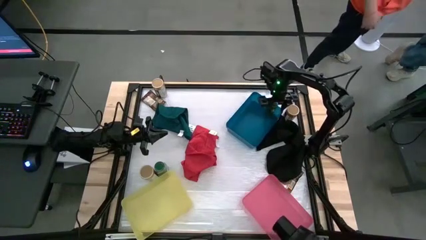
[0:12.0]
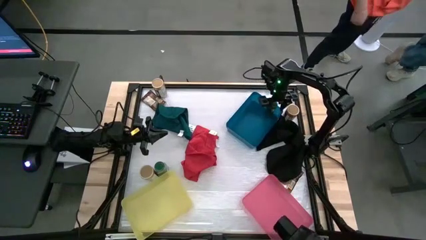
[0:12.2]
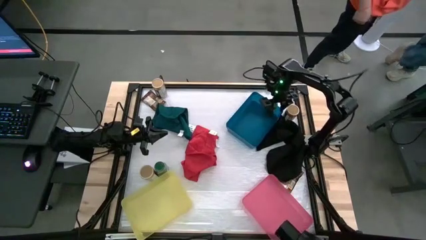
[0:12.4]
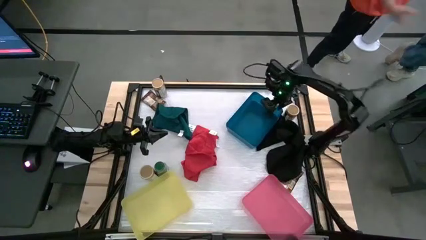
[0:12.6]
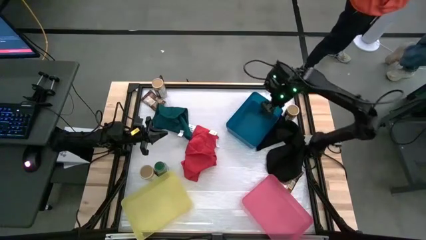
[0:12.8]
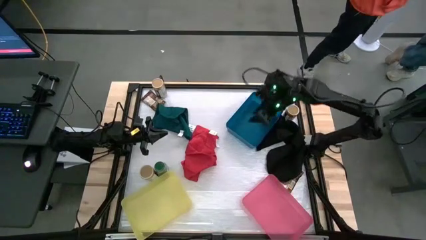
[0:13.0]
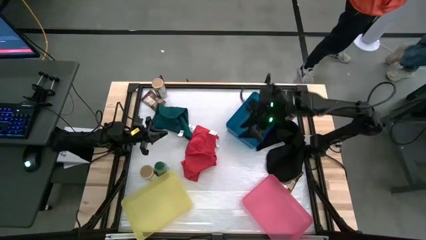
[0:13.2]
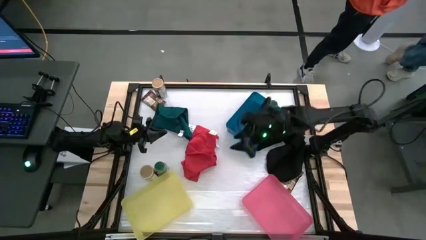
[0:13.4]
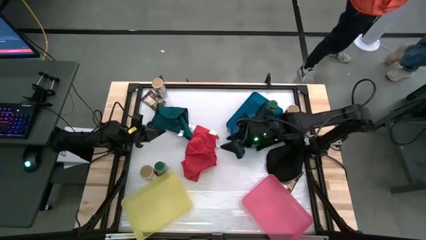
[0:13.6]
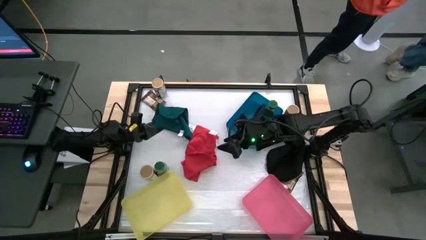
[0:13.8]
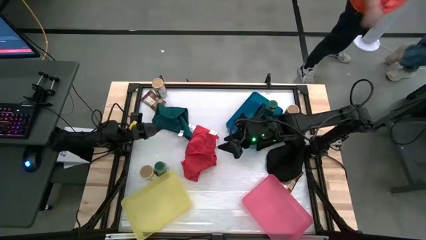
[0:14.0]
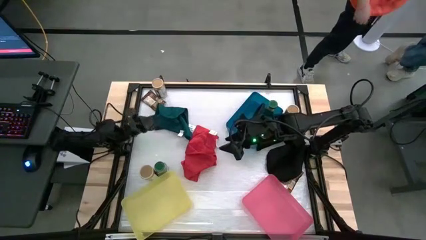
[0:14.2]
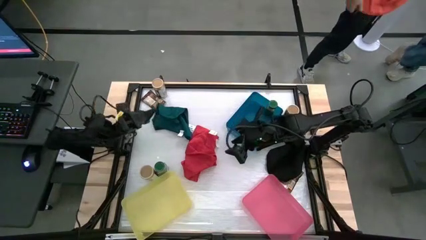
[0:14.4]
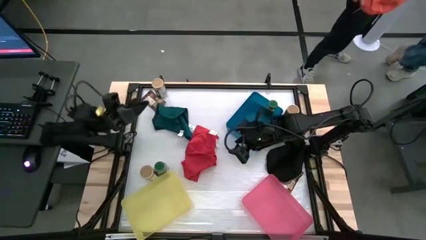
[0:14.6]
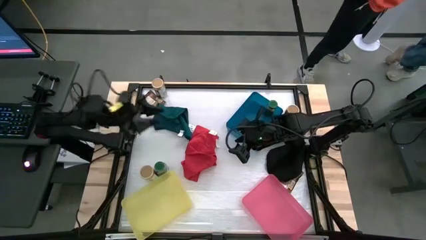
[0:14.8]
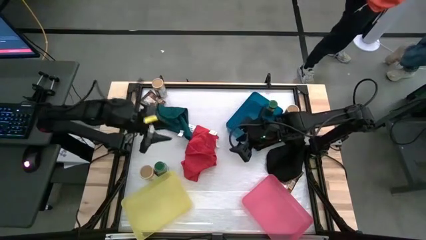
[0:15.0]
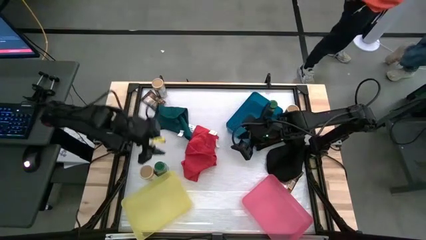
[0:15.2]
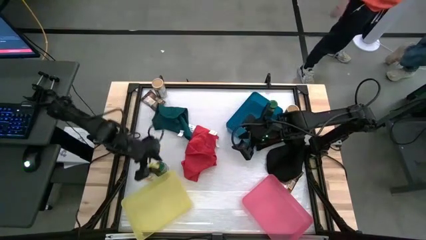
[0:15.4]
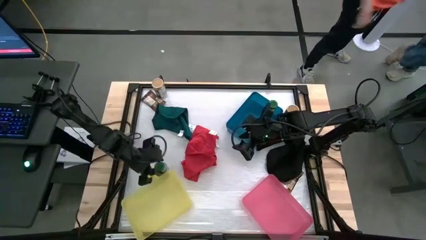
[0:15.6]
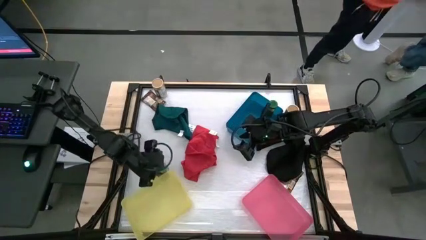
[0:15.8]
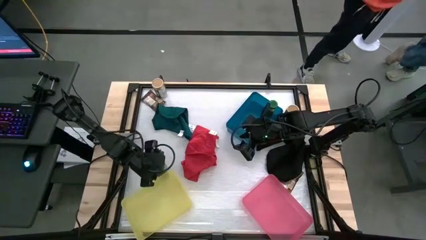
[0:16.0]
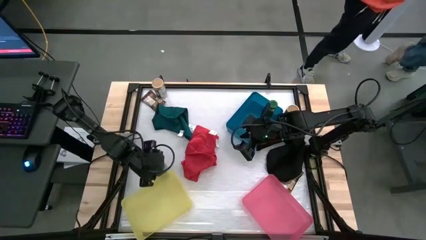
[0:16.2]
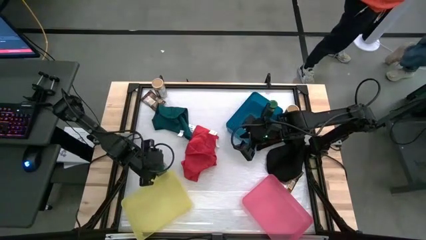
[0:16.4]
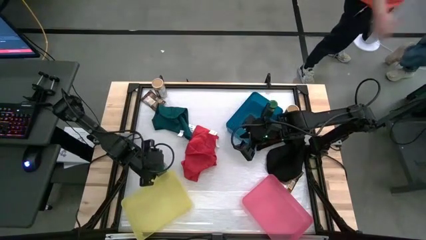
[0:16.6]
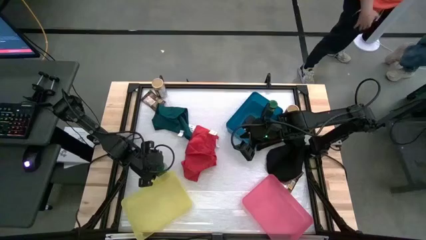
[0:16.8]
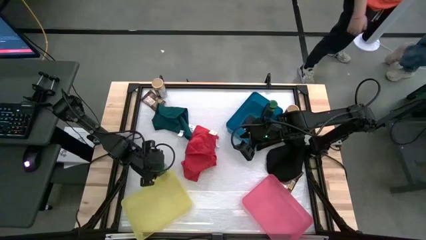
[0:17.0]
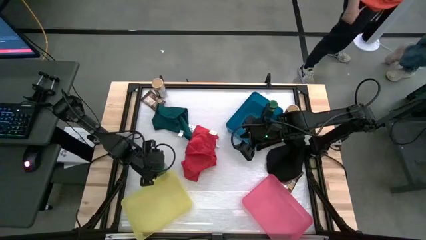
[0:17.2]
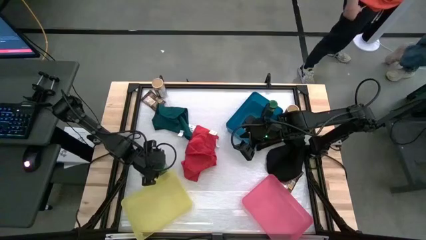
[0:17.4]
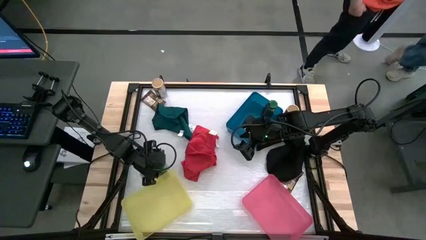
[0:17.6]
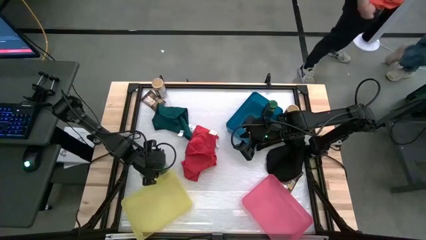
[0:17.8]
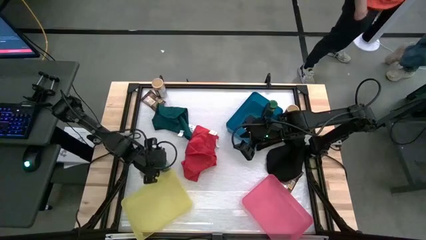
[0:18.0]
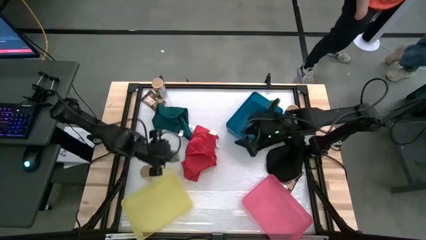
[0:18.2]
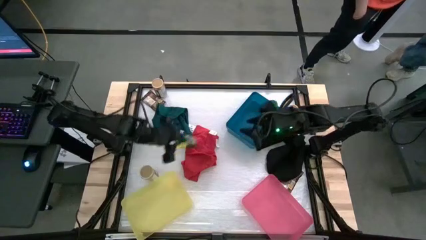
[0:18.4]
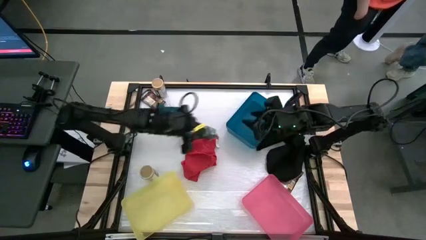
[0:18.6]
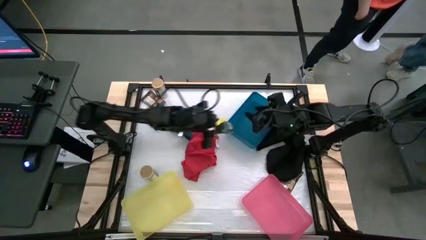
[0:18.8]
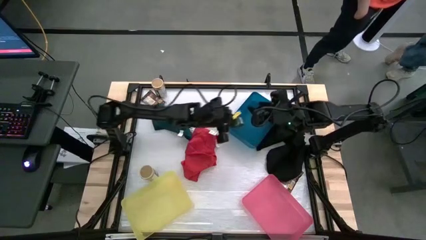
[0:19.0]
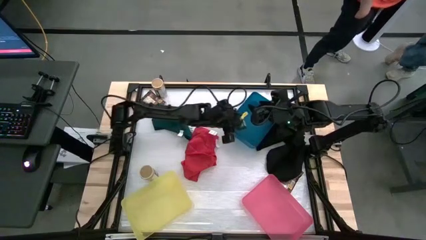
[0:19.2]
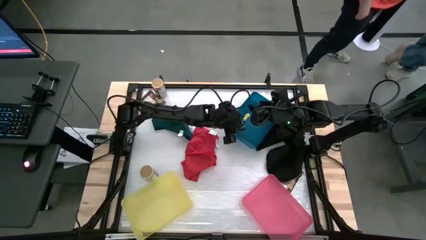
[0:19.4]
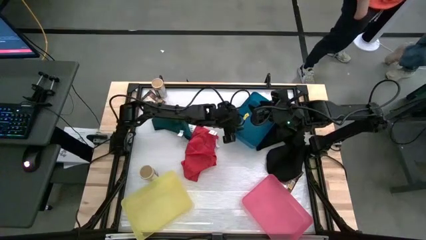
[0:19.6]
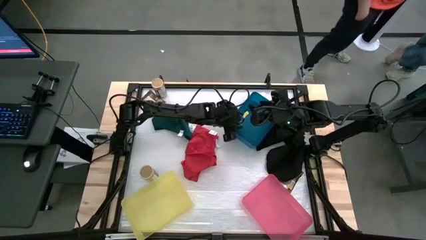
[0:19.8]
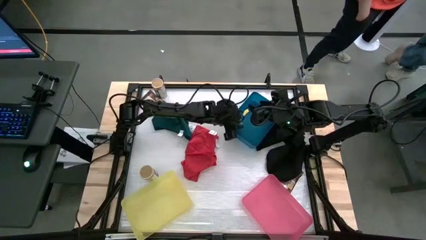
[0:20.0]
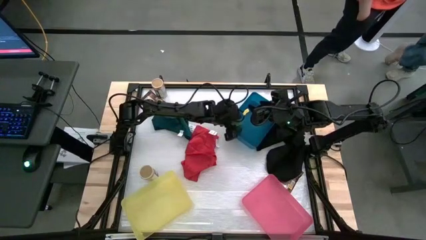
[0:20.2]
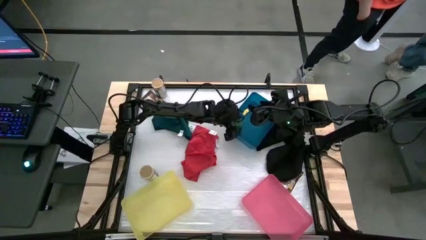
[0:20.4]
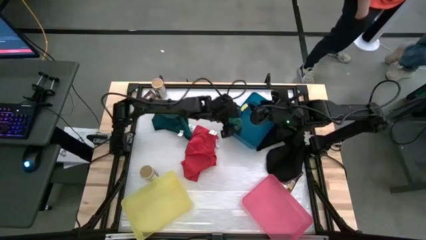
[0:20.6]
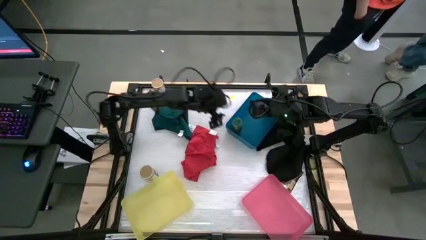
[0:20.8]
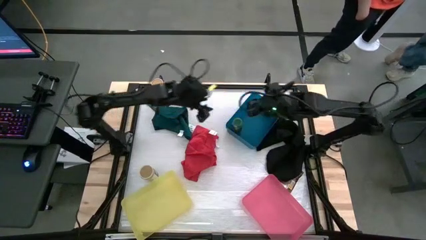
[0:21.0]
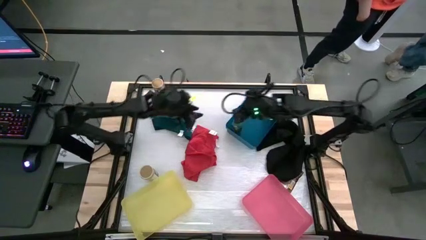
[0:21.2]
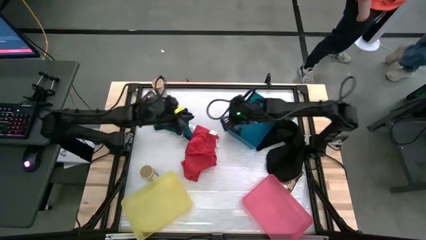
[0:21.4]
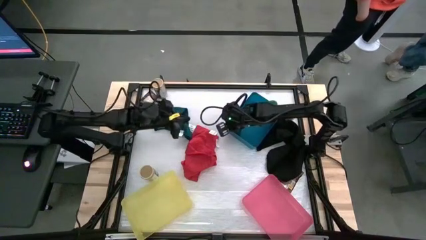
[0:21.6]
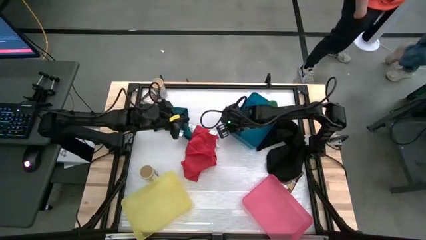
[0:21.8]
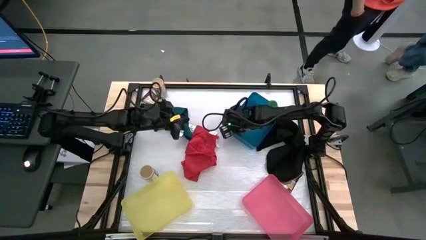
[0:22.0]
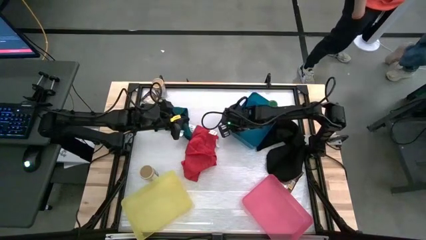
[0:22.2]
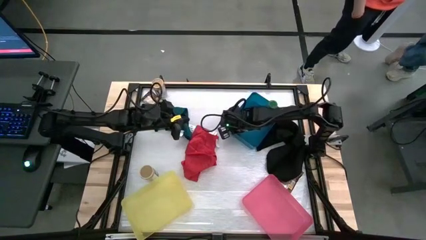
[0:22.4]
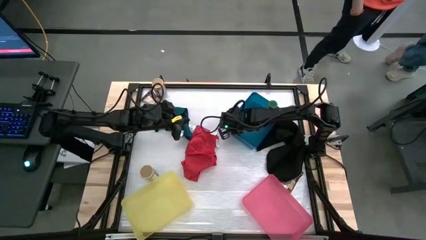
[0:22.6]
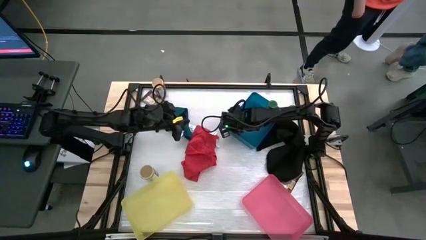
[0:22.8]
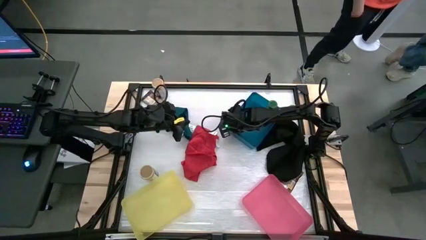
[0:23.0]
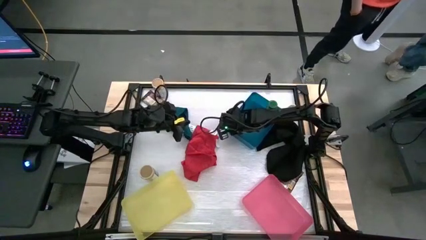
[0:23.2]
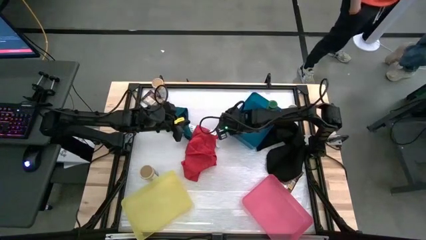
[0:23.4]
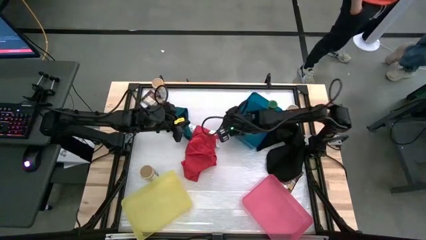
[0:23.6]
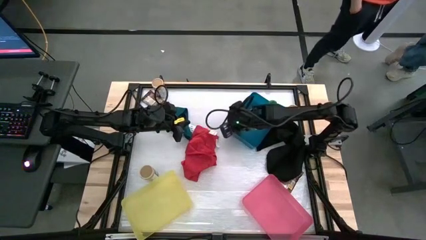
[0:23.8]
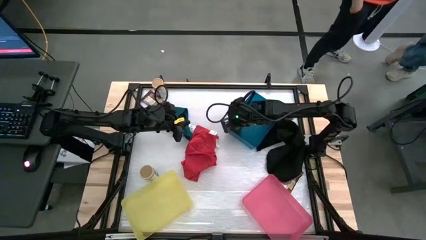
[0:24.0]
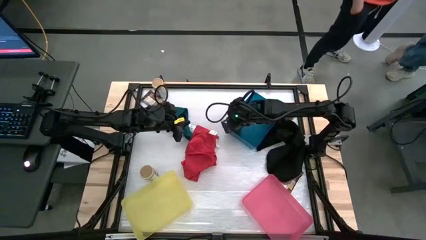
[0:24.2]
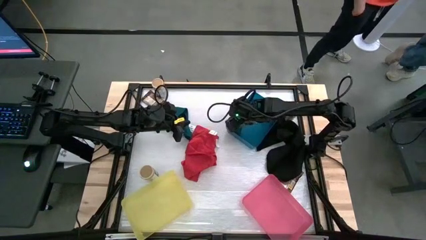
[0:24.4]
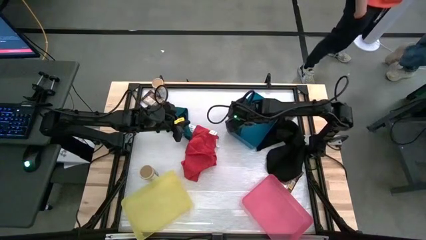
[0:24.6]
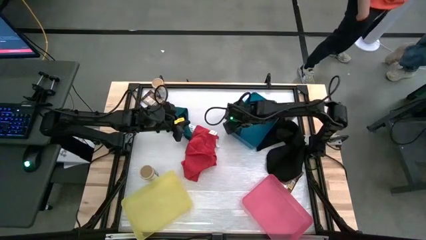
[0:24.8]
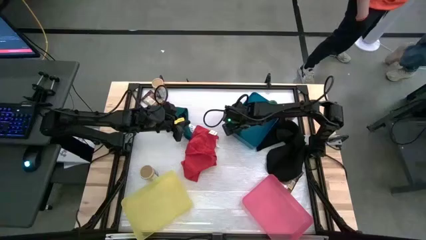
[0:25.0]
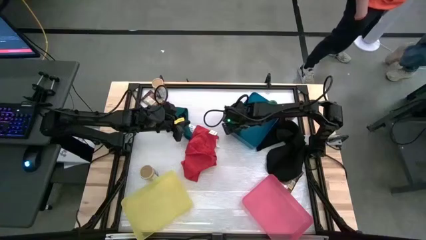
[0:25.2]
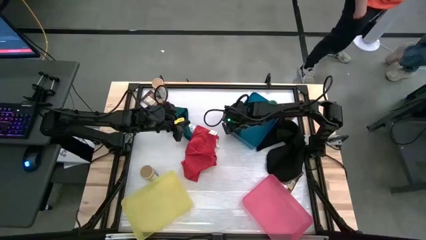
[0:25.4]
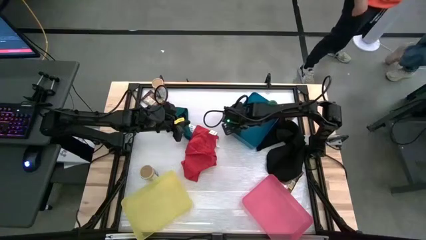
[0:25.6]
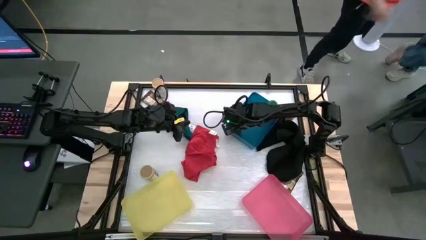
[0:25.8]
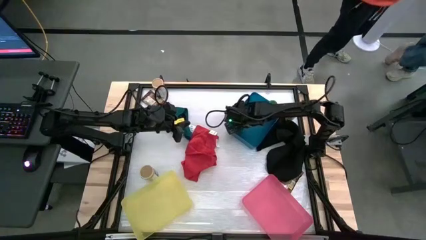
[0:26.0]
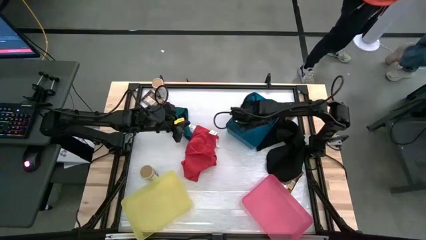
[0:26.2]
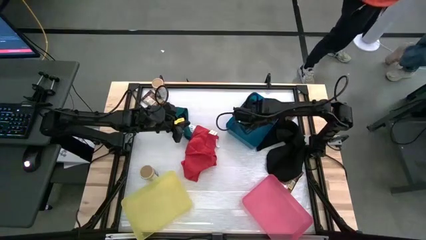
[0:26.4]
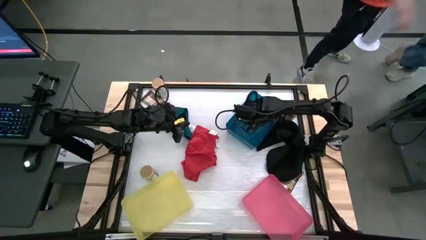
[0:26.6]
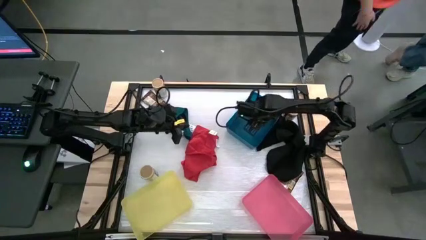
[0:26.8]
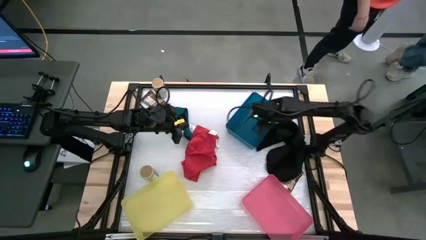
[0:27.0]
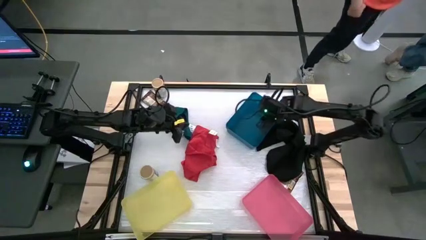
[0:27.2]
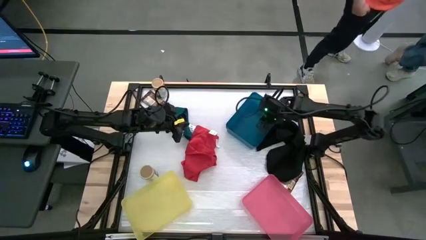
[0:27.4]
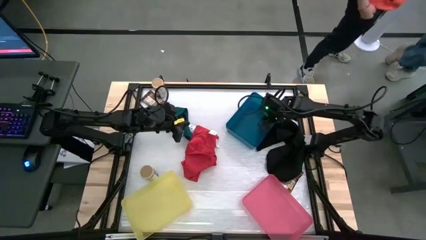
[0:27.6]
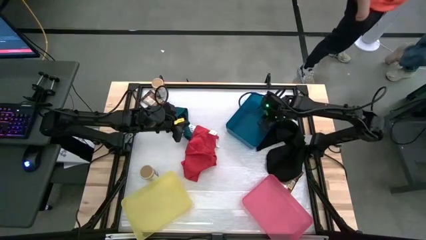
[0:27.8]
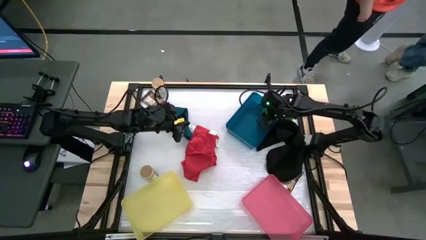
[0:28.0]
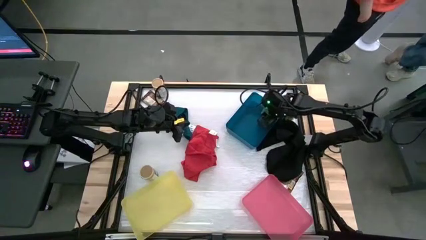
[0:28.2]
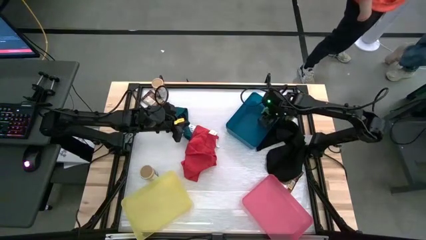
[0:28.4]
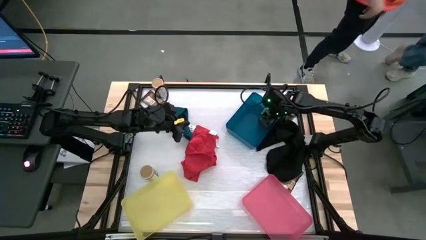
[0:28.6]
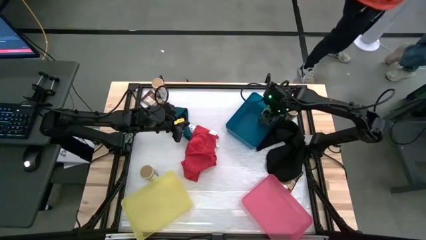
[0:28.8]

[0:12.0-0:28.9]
Task: Sort spices by type
Put the green seasoning bottle into the blue bin

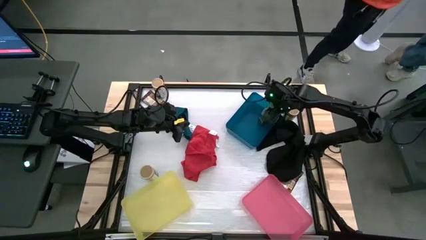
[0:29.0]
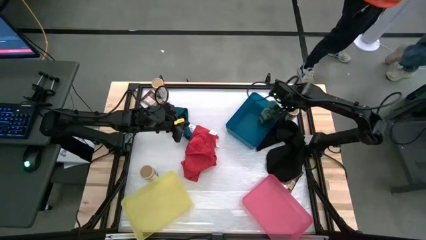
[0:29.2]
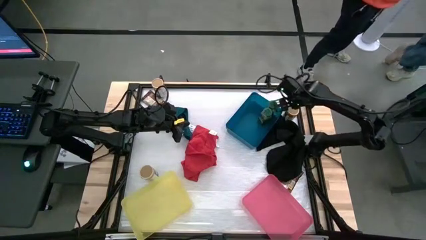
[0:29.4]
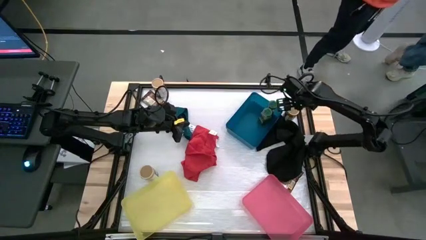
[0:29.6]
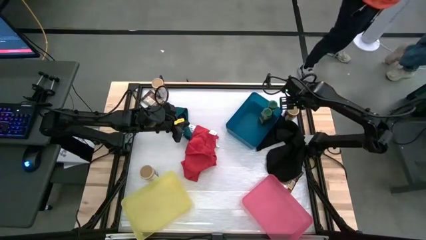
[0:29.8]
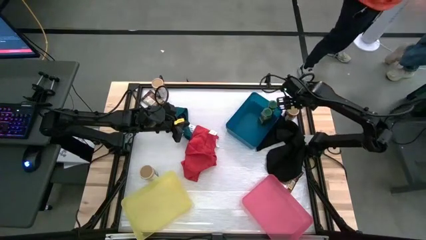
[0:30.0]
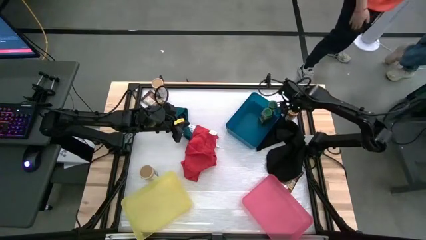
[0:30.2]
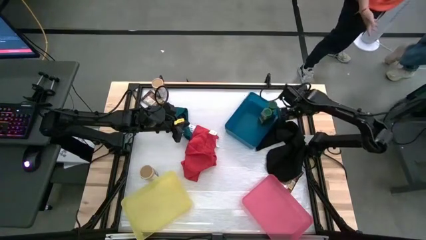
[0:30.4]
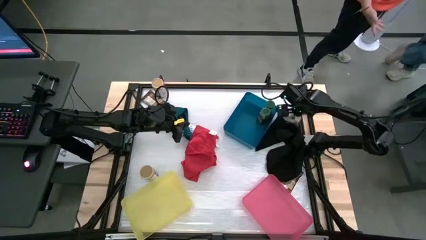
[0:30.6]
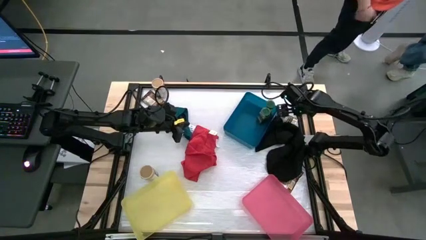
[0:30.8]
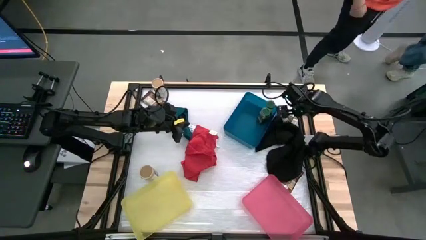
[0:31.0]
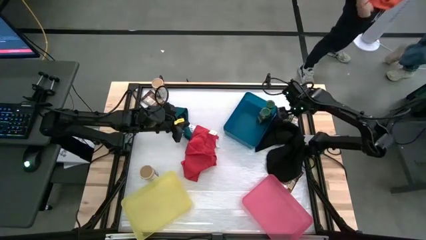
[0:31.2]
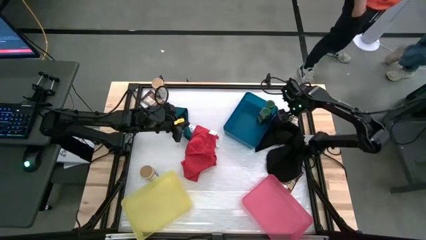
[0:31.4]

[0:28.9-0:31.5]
Put the middle right gold seasoning bottle into the yellow bin
